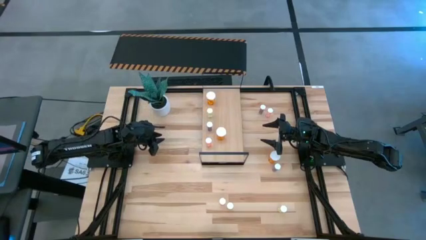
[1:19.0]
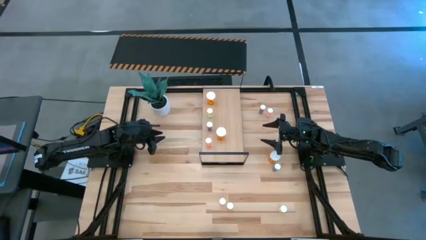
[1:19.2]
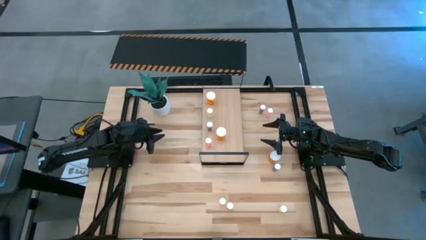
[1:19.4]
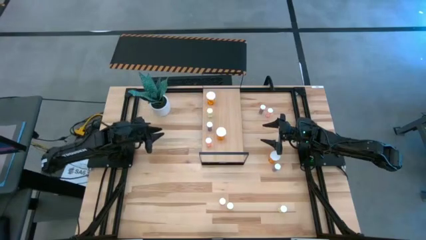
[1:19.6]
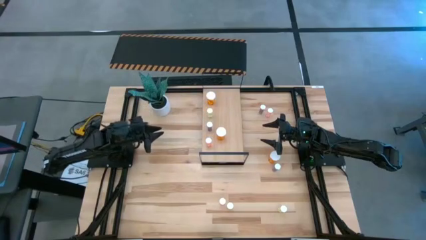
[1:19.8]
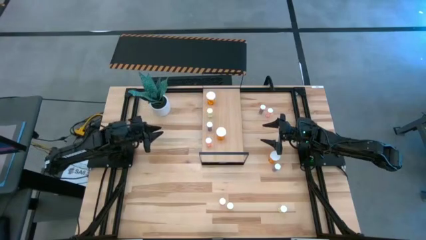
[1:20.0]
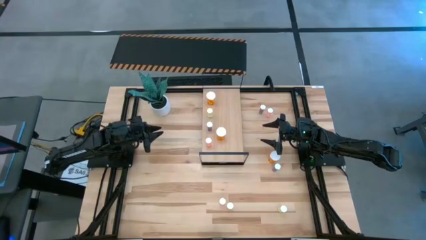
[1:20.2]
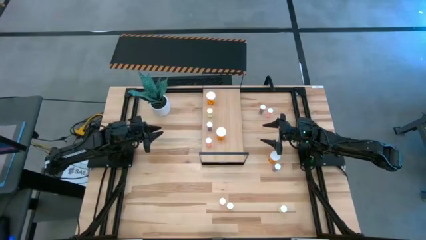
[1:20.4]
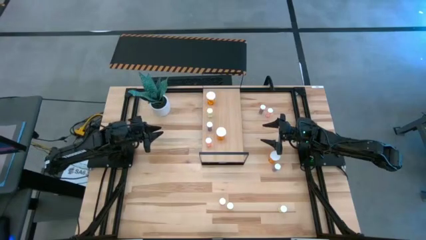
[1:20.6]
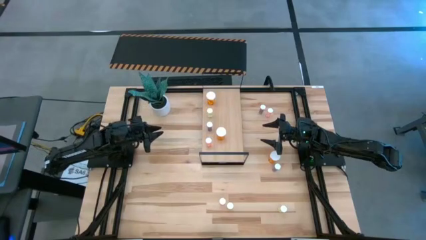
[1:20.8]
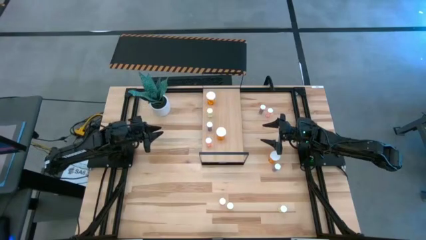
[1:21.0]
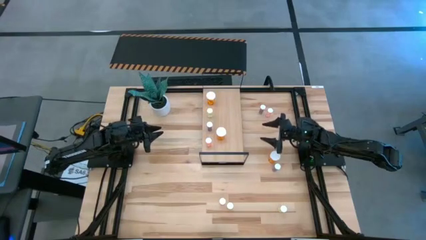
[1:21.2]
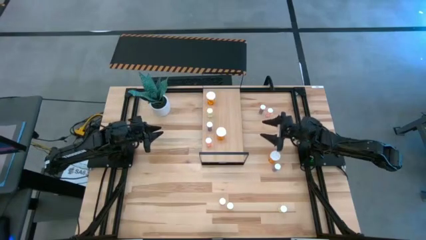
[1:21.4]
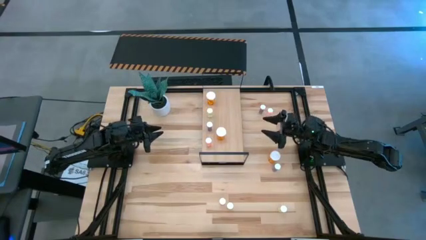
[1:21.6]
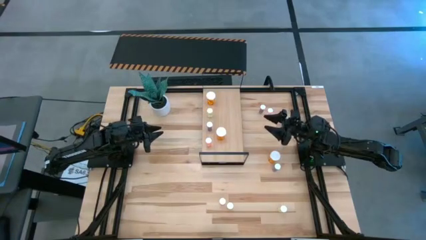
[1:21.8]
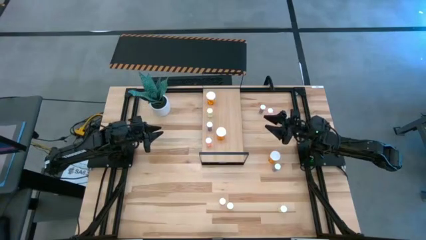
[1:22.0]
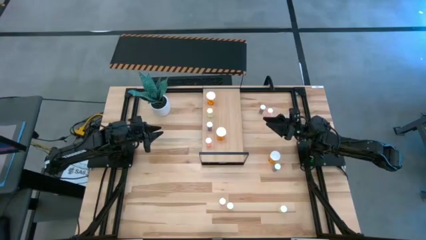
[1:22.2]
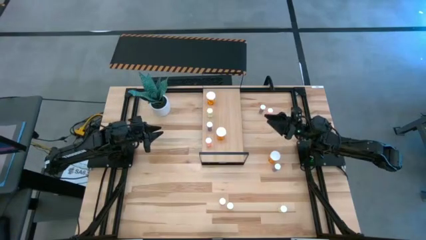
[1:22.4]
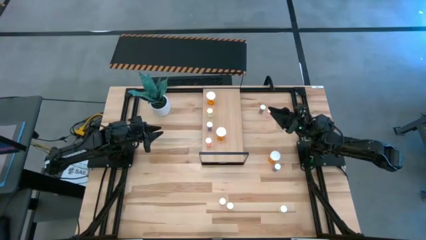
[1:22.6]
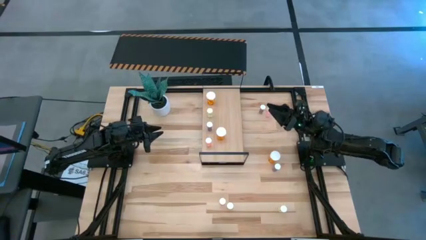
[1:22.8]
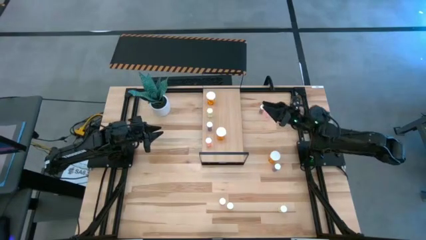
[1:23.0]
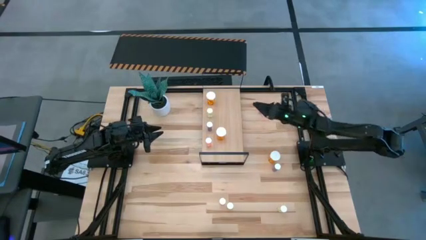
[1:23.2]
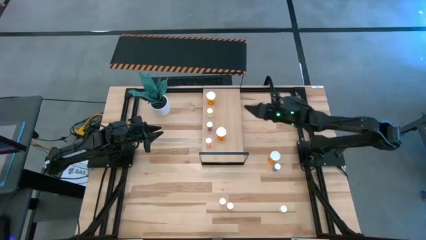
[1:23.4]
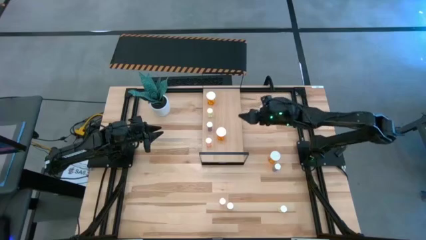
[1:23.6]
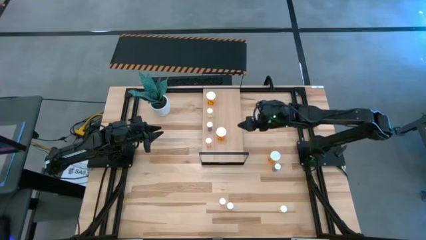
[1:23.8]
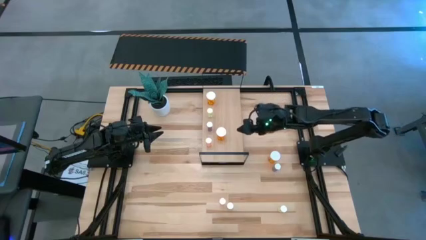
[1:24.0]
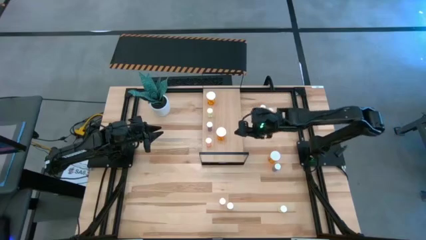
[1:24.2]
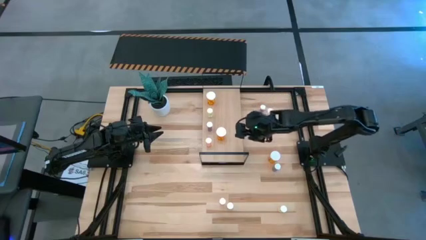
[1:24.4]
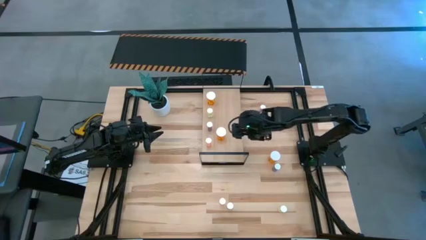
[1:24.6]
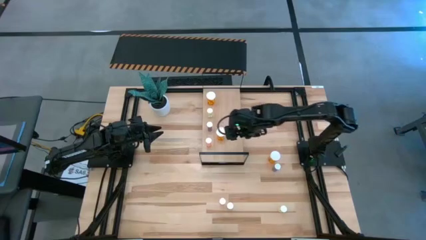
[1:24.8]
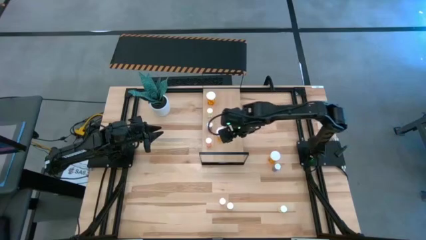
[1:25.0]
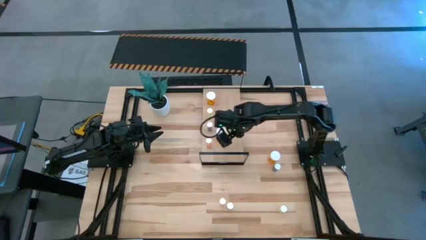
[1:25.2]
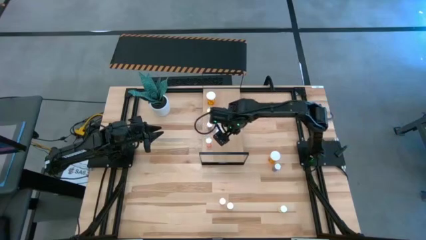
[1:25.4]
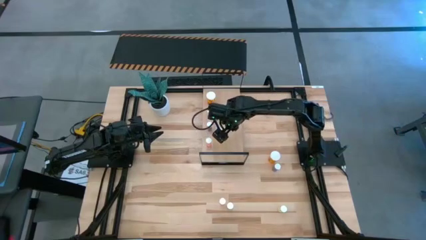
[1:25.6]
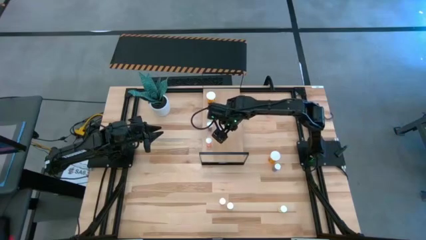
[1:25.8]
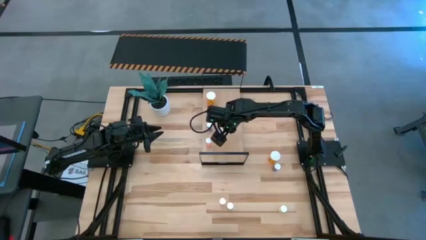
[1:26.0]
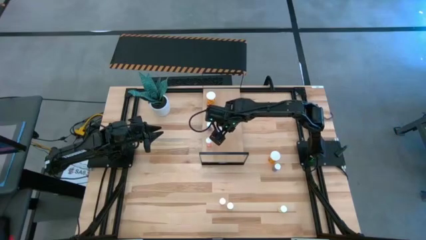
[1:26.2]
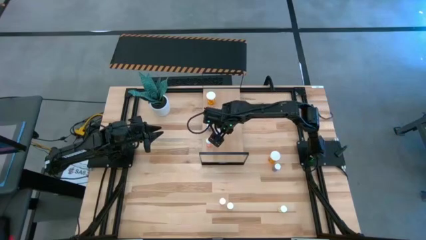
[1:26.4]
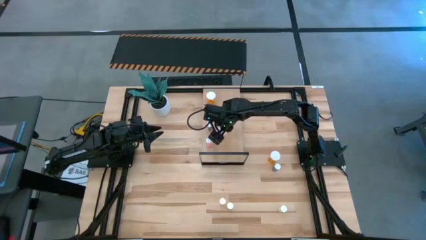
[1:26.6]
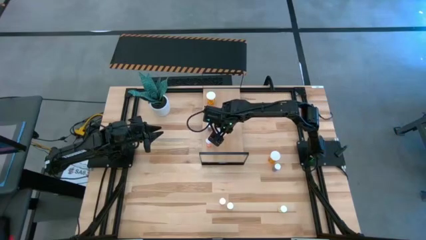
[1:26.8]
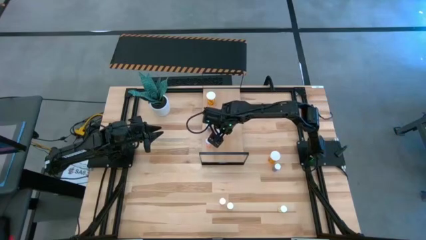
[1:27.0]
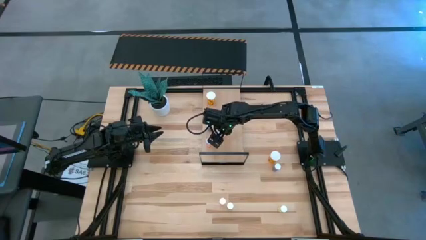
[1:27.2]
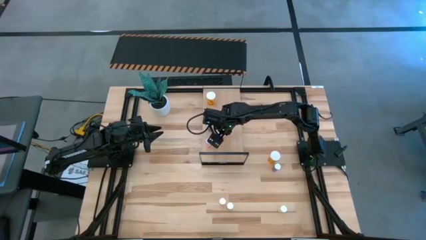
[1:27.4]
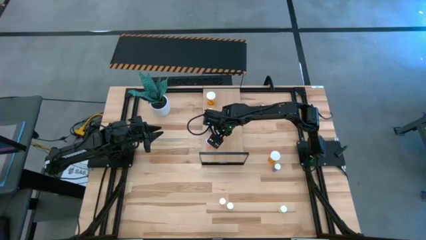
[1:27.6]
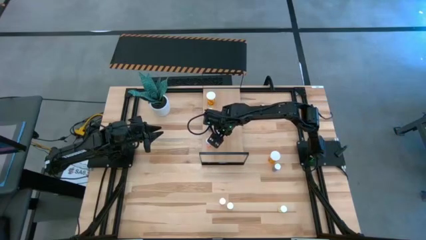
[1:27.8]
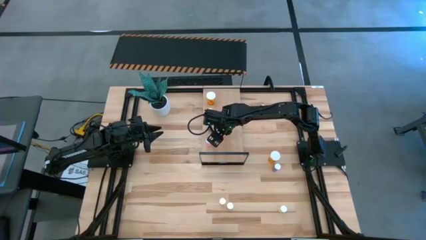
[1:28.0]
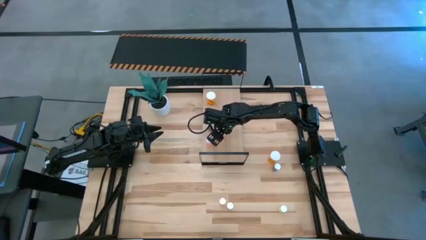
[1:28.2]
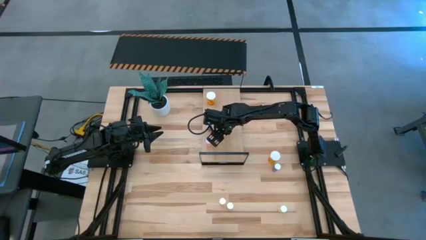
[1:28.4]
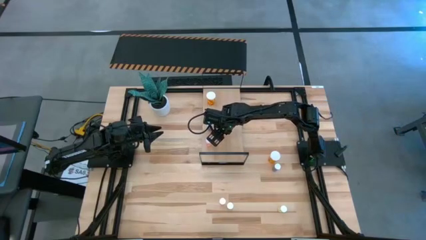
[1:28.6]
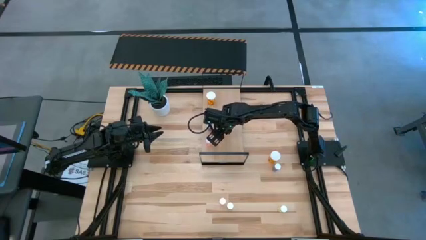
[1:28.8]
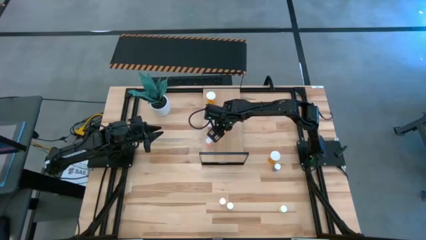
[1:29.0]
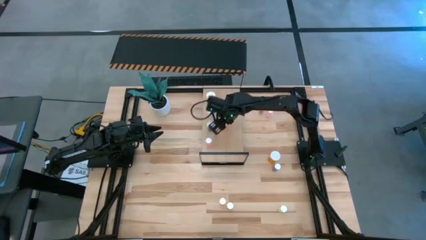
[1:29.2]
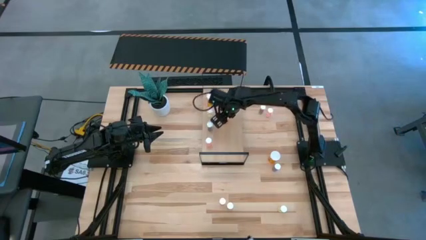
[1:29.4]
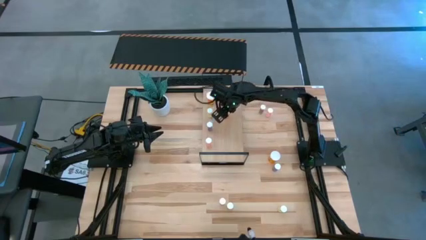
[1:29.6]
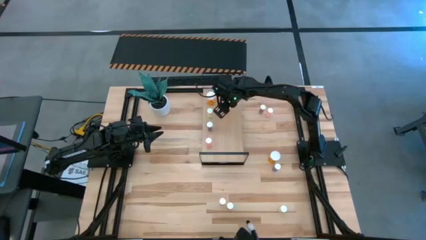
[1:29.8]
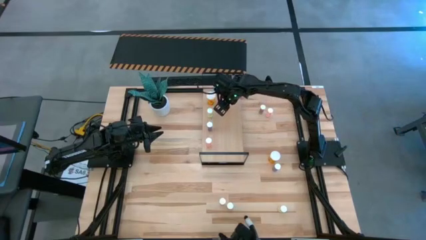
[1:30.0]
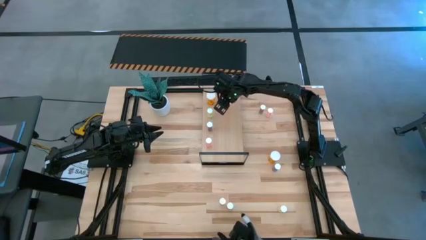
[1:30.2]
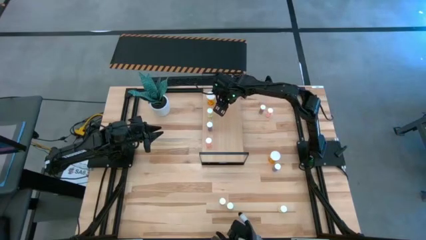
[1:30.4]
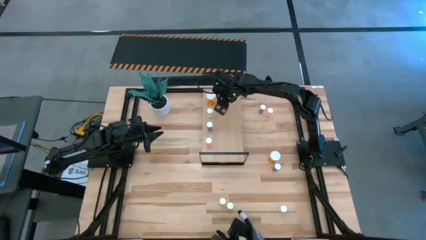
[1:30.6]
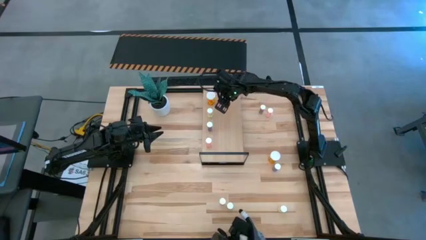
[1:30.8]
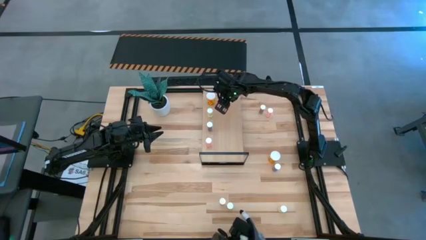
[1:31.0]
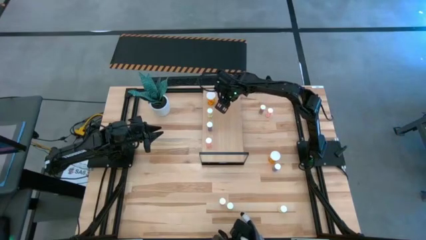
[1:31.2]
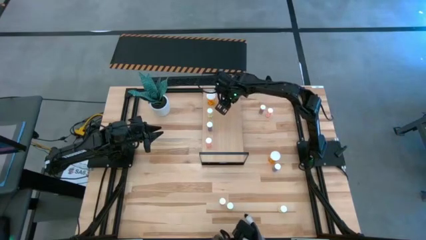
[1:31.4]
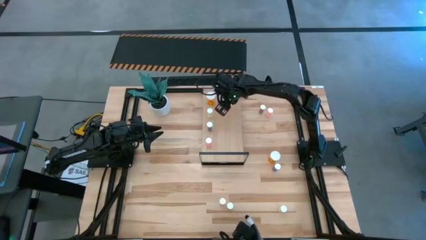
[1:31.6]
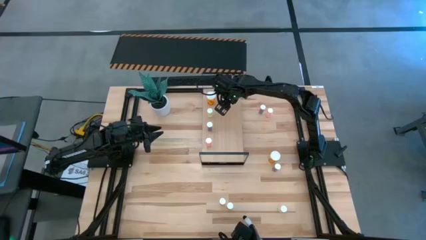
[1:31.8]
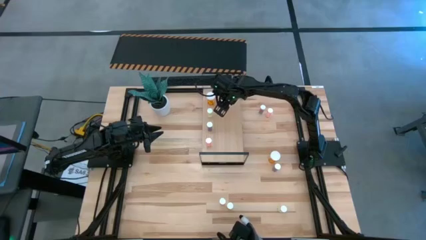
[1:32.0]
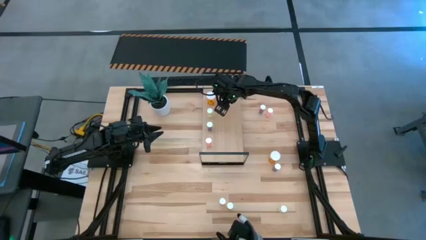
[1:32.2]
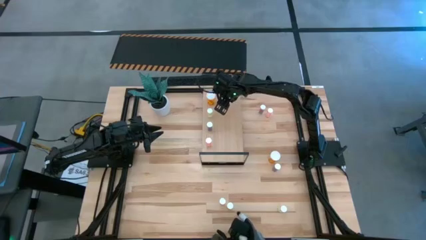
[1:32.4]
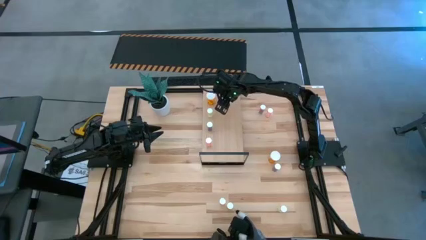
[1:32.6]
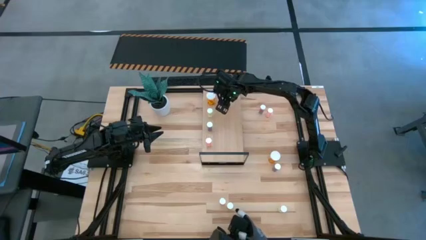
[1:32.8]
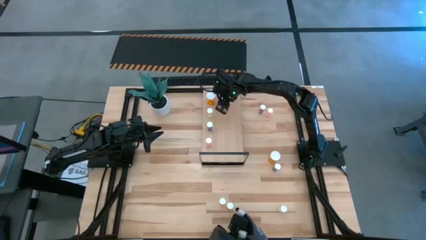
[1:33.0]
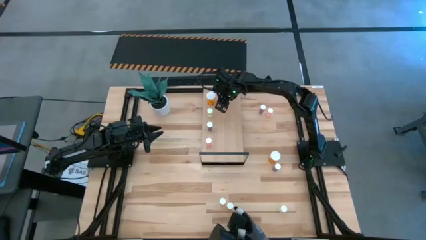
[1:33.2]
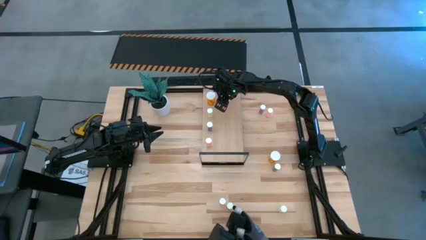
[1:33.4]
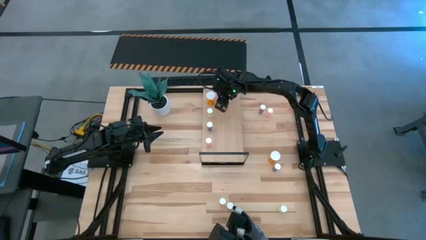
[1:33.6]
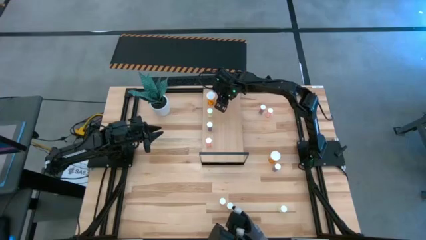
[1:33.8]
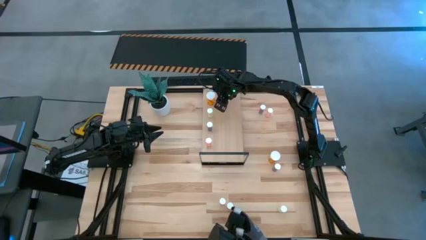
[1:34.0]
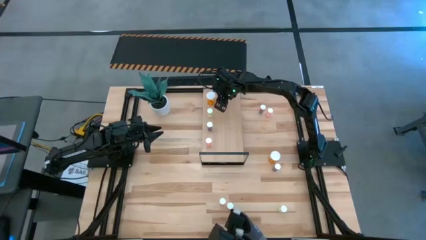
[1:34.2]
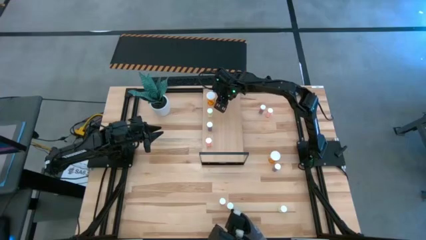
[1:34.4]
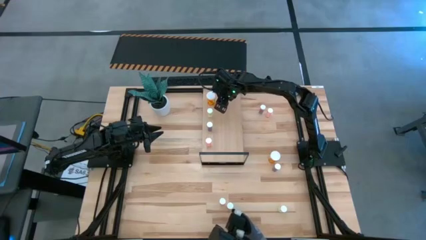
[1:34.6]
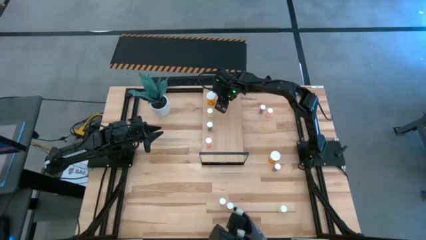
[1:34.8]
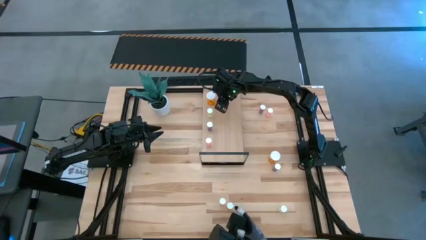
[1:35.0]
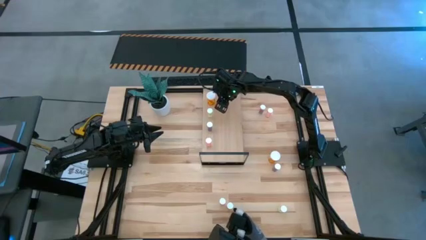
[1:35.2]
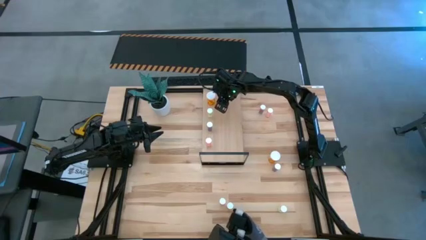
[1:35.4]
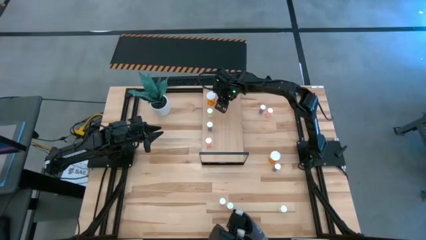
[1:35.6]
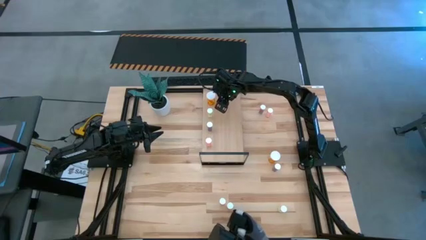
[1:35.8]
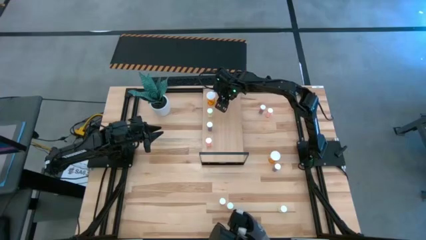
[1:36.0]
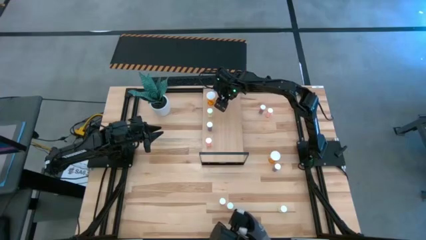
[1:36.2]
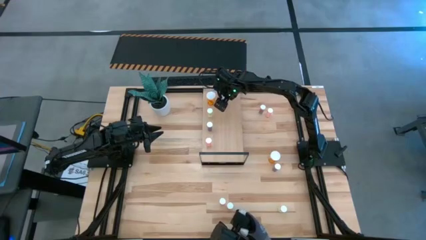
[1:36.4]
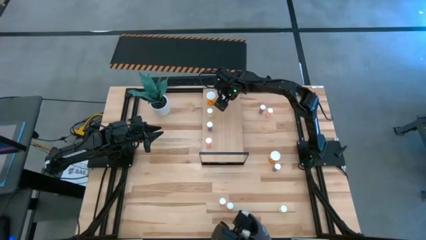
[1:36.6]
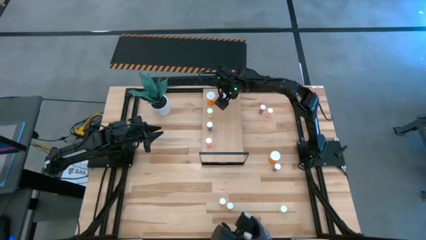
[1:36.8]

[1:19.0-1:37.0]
Task: Pick and place medicine bottles onto shelf by color
Put the bottom large orange pill bottle on the shelf aligned with the other large orange pill bottle
